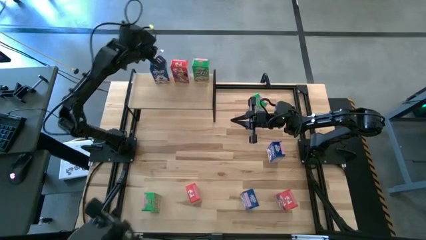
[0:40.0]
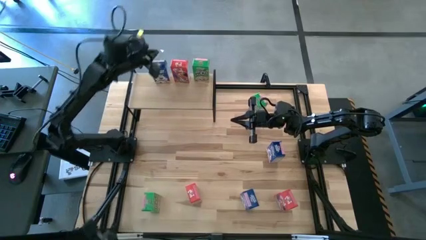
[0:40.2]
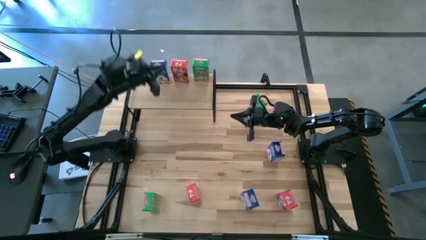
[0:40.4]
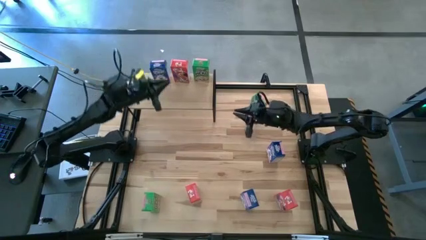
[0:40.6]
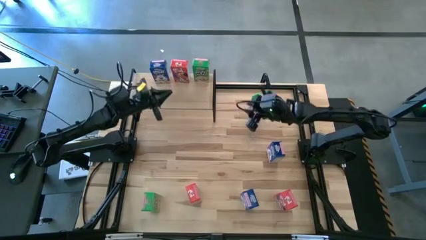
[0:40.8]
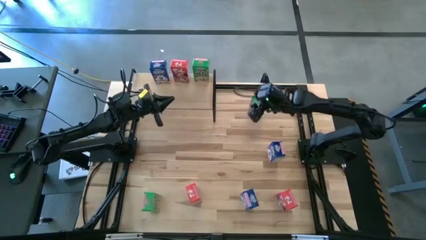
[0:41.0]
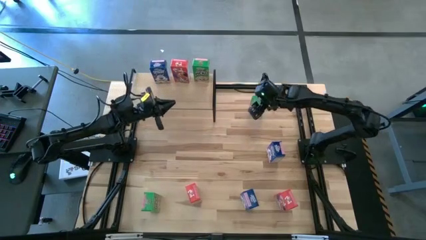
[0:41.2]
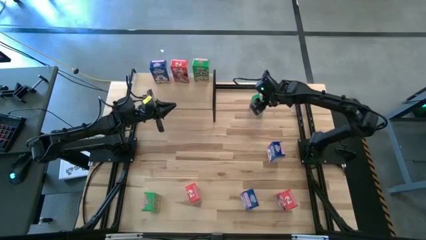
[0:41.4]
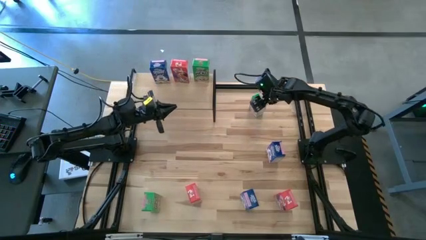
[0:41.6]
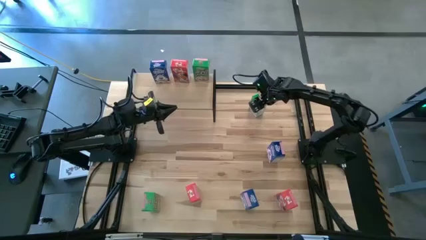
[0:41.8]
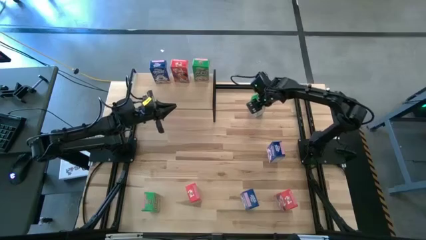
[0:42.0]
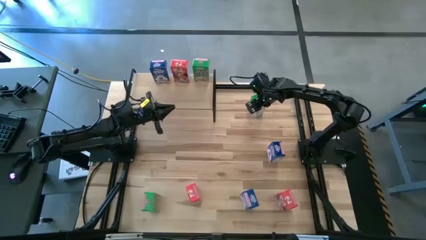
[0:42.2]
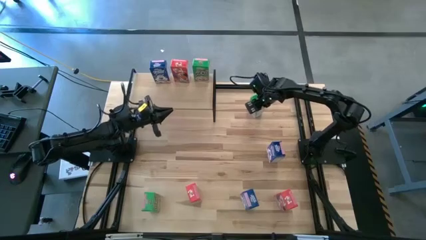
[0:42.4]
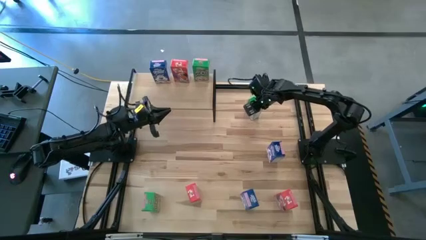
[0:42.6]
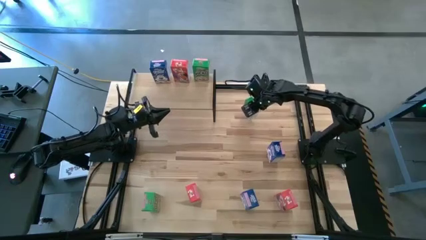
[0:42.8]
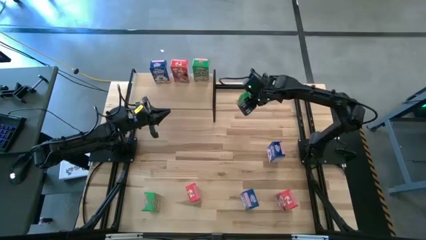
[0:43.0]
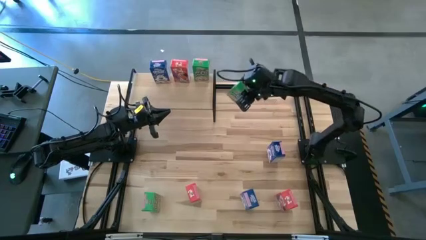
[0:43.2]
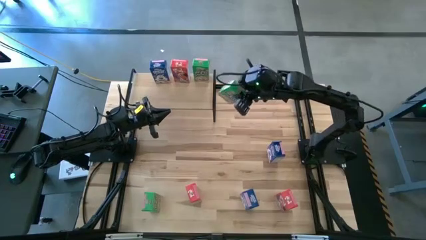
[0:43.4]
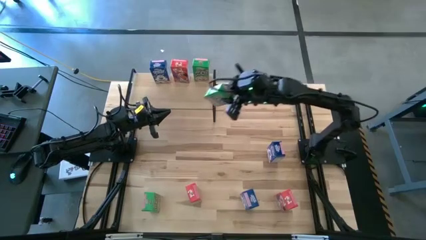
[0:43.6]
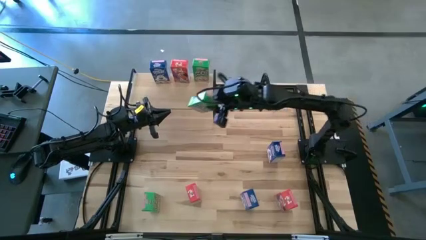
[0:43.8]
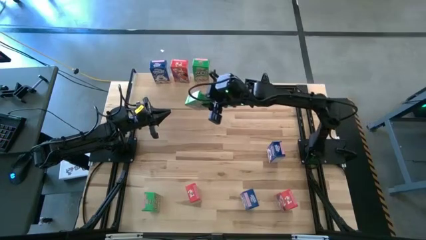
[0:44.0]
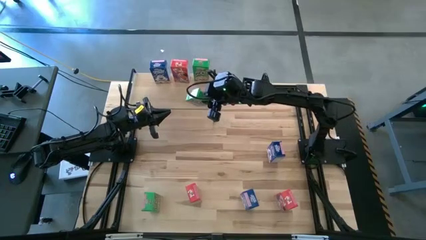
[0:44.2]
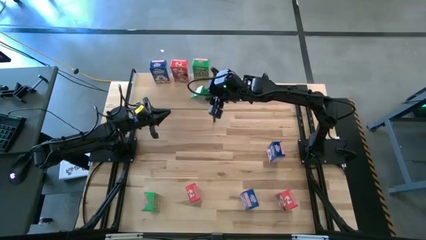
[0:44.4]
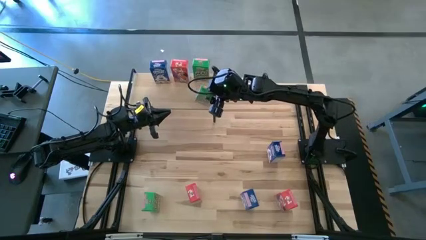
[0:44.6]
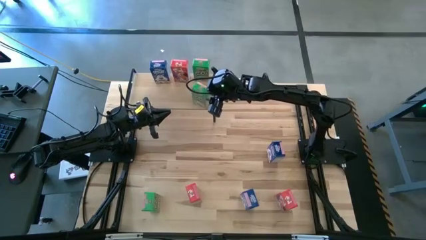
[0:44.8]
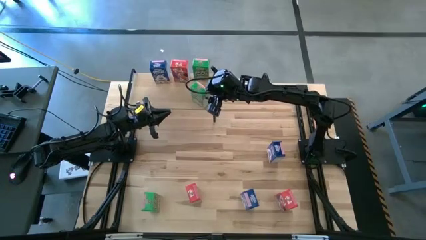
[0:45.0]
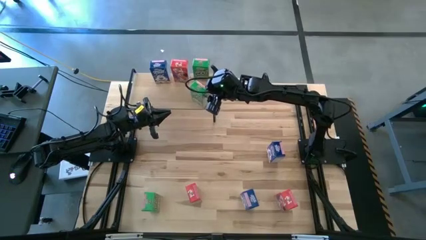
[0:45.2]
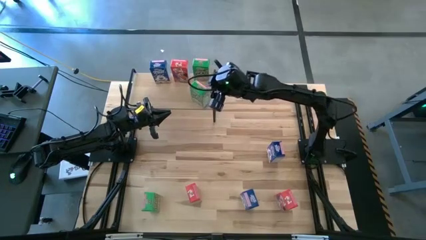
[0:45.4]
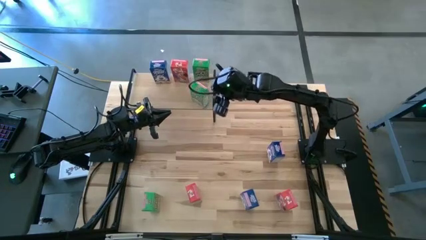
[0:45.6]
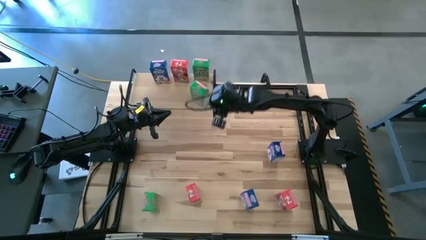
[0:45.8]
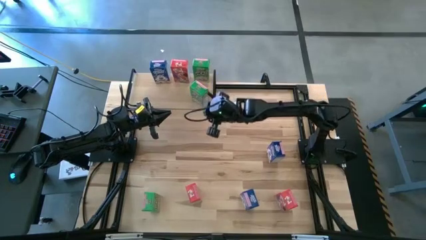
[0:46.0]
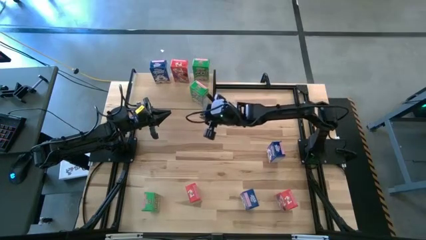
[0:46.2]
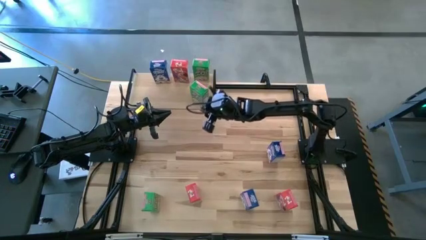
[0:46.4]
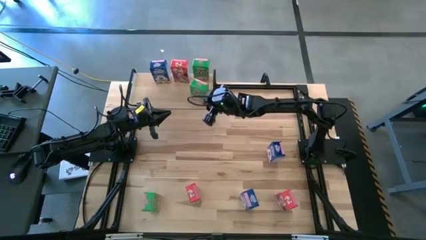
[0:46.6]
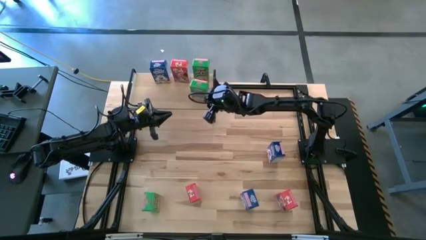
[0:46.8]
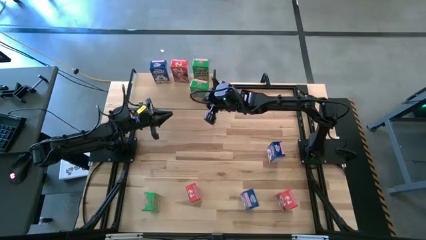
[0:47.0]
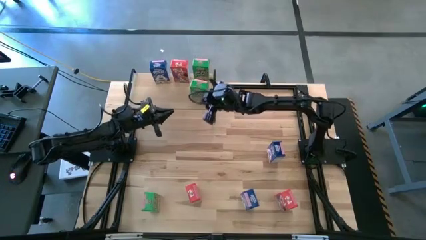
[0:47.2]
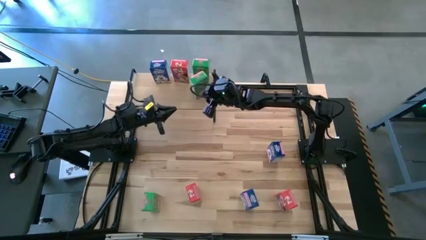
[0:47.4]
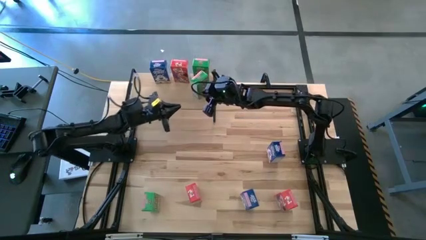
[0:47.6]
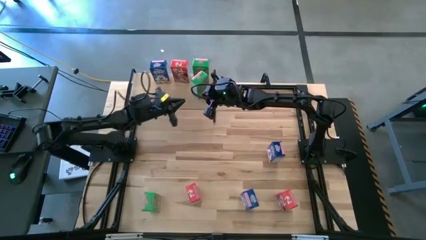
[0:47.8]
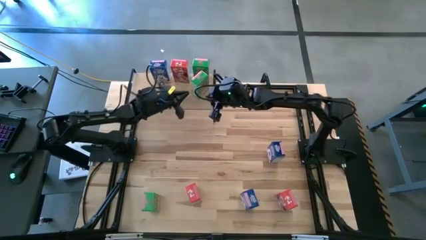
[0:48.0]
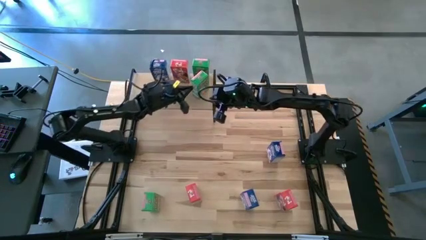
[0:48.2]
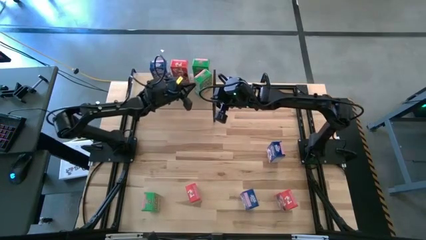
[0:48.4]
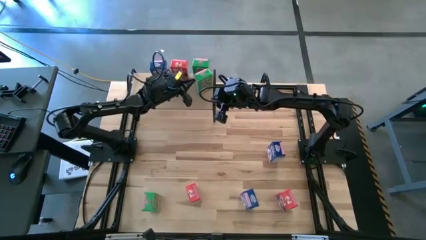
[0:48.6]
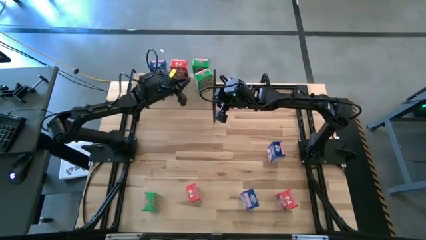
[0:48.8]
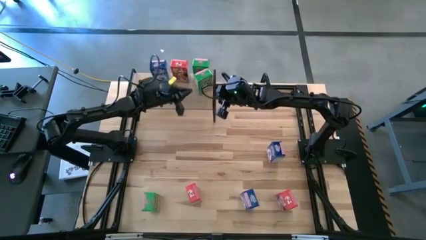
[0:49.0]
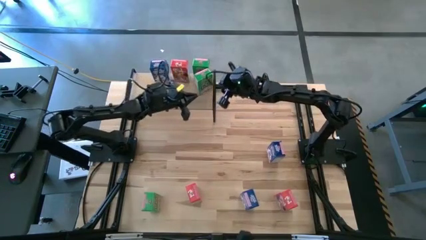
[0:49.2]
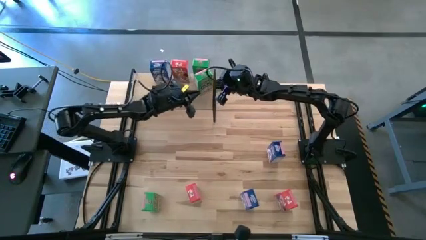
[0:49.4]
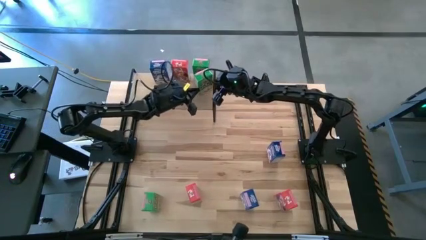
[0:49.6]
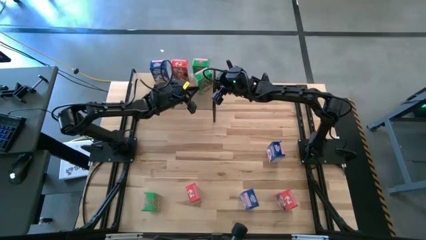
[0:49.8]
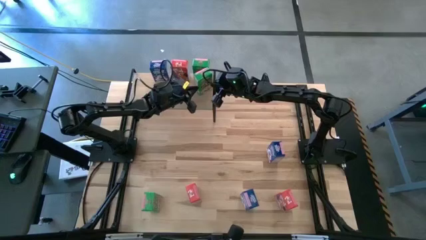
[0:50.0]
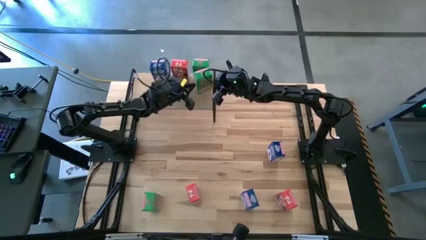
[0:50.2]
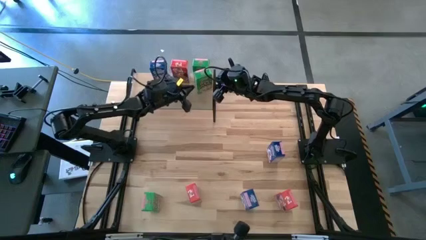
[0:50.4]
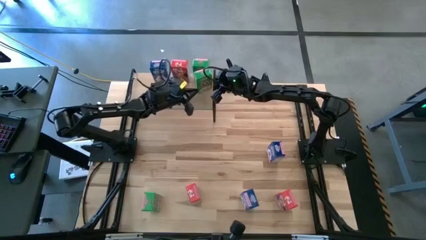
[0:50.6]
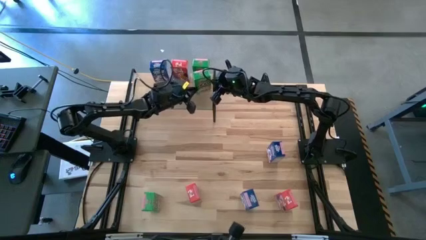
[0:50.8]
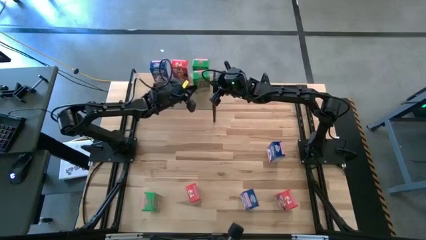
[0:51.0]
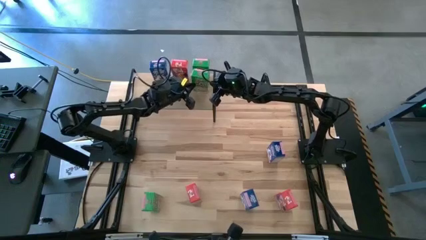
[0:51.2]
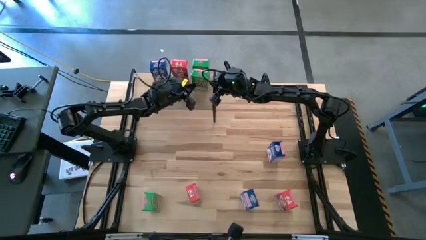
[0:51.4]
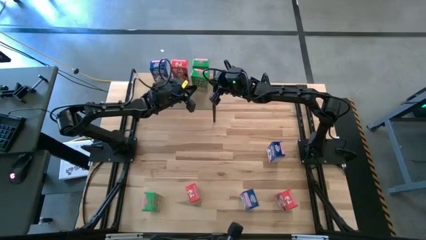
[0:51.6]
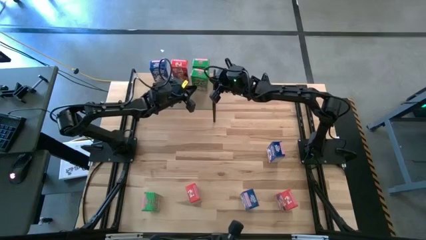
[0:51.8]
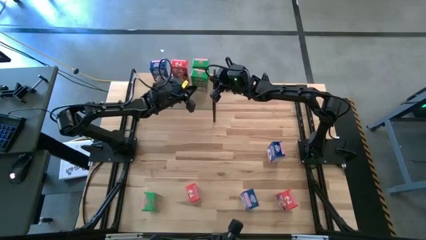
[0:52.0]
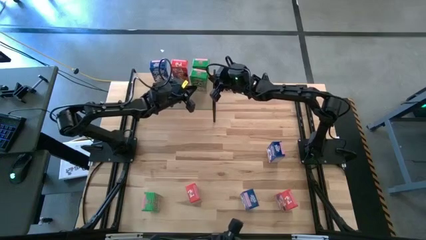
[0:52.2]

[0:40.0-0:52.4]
Task: Stack cereal on shelf
Put the top green cereal box on the shelf aligned with the other green cereal box

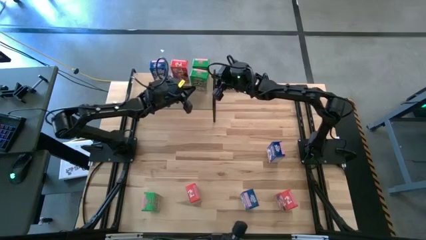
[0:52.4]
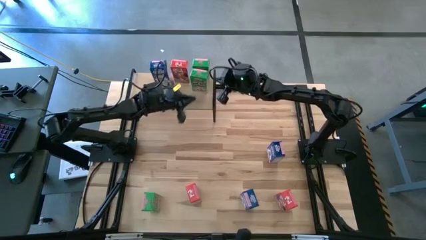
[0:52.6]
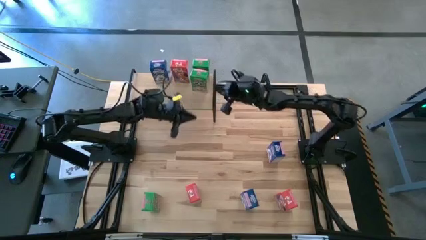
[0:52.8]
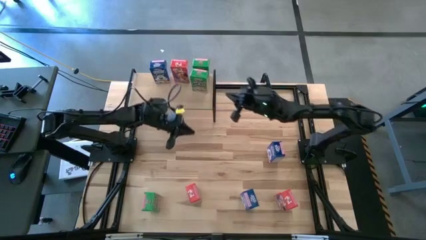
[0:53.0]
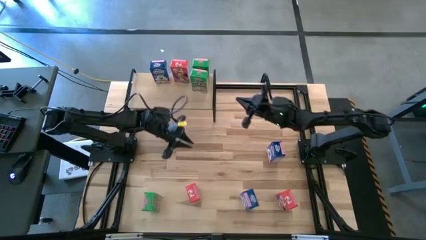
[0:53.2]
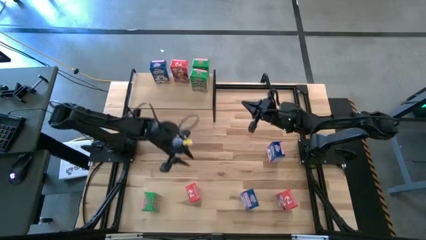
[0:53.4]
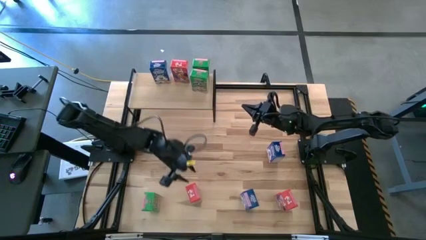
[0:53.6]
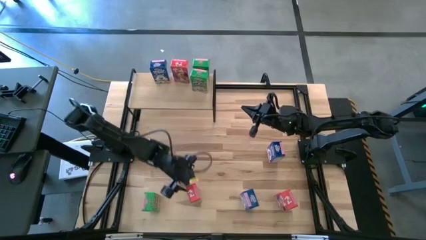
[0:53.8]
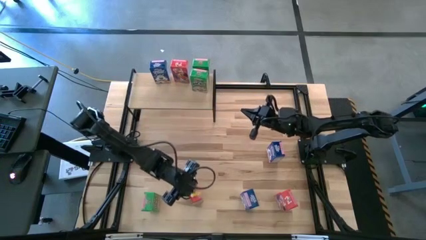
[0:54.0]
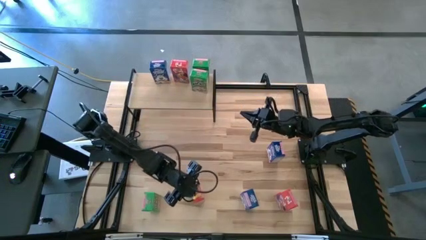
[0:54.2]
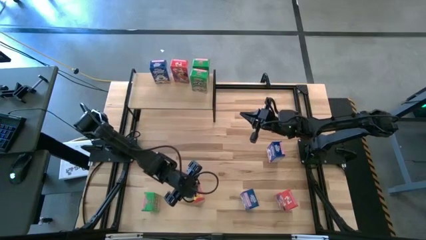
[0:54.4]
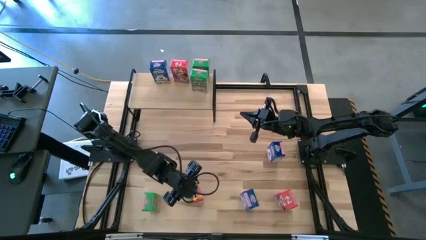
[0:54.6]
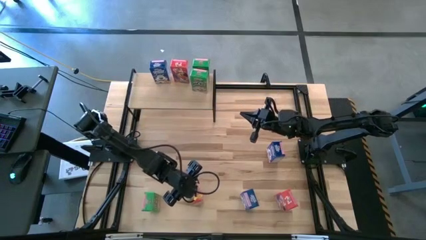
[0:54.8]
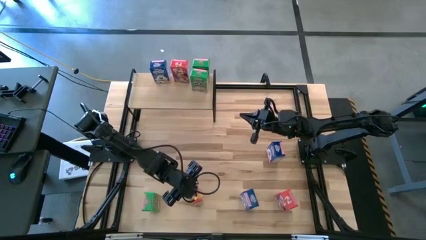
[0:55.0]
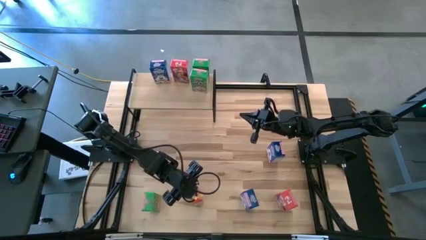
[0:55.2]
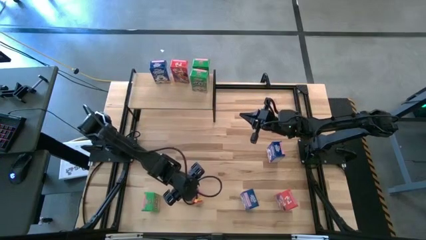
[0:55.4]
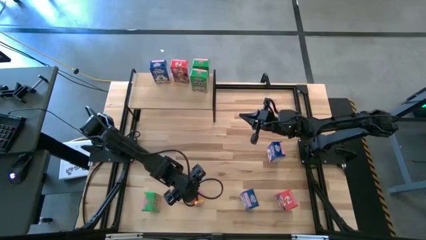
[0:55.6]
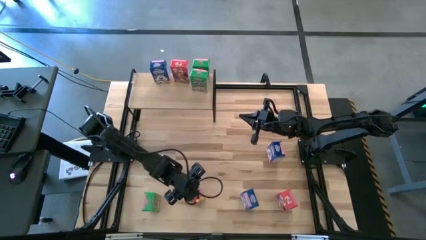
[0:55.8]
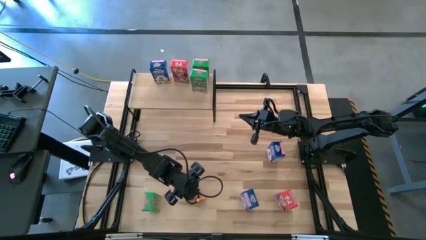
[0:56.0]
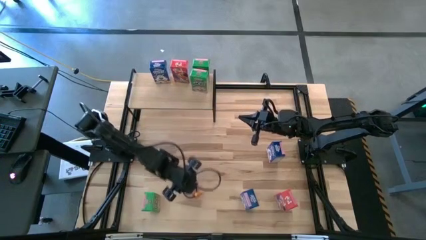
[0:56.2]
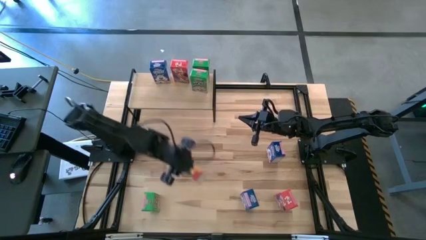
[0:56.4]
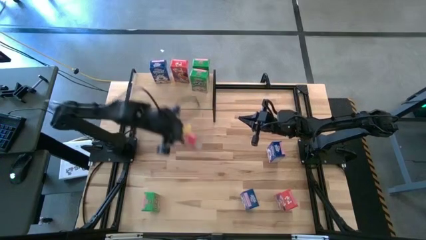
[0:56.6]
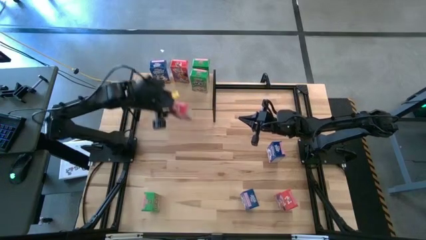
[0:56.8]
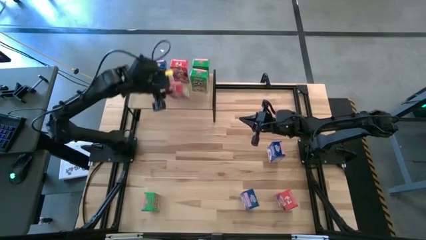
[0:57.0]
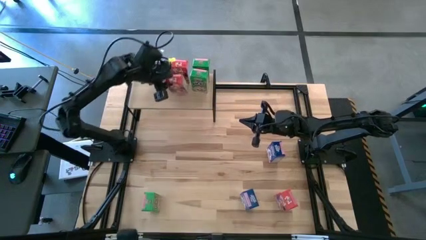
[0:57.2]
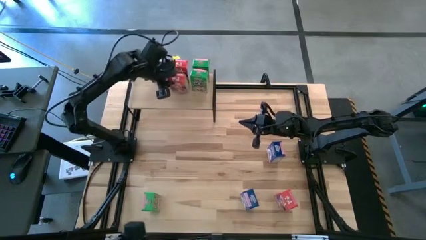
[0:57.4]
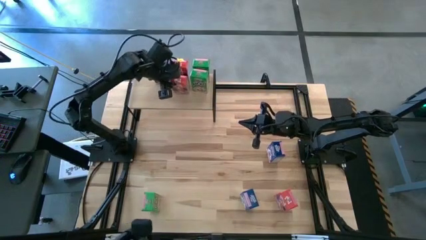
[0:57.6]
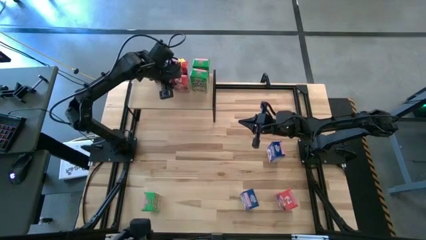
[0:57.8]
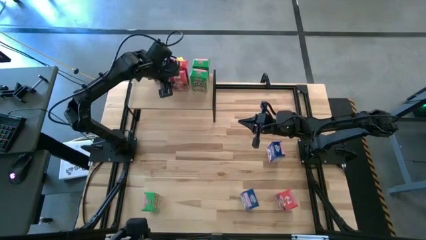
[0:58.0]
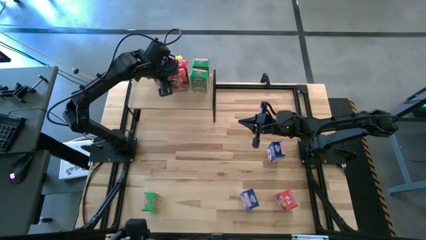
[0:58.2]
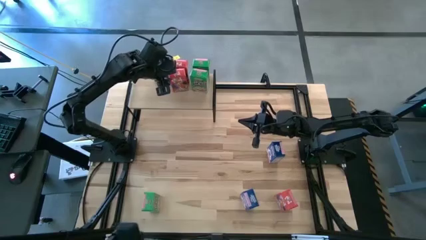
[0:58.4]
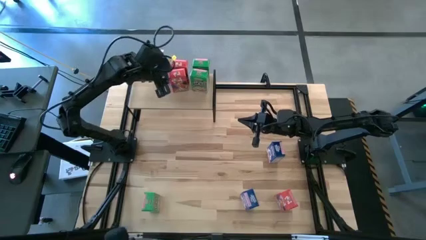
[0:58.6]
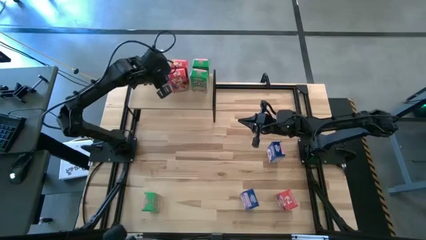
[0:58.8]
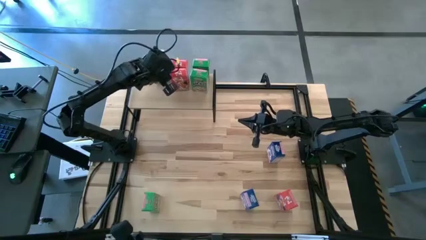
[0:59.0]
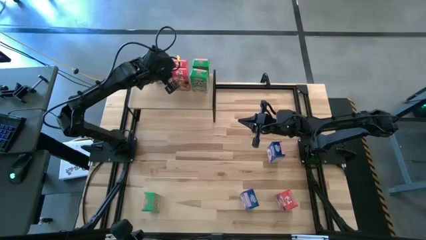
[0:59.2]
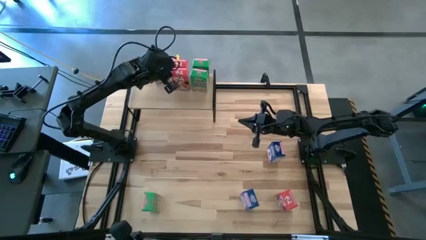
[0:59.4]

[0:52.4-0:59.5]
Put the left red cereal box on the shelf aligned with the other red cereal box
